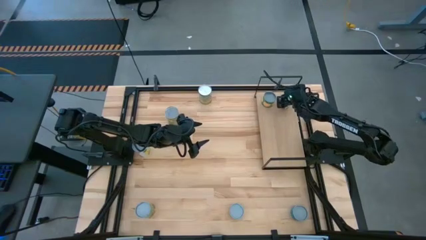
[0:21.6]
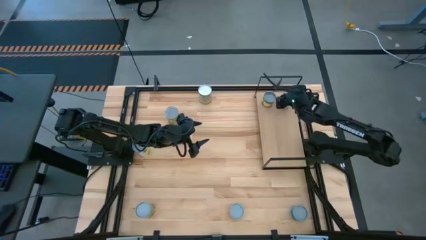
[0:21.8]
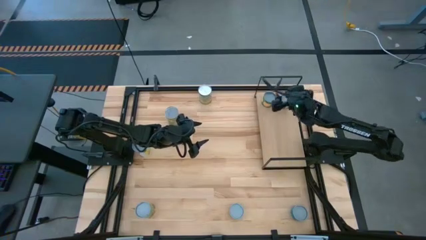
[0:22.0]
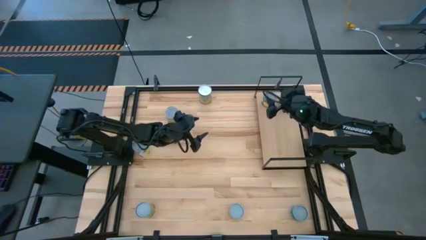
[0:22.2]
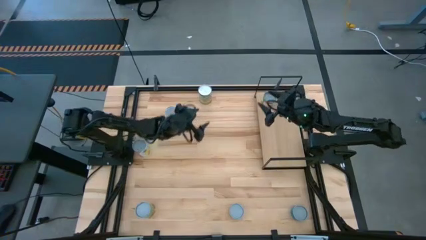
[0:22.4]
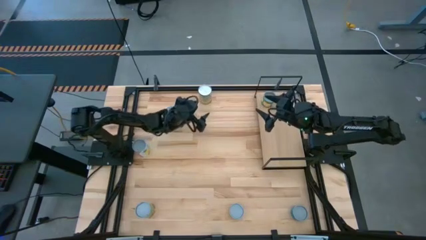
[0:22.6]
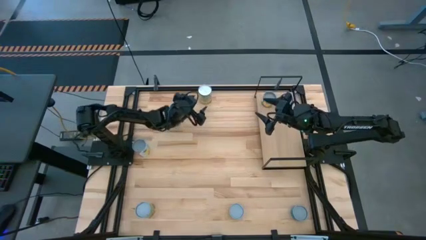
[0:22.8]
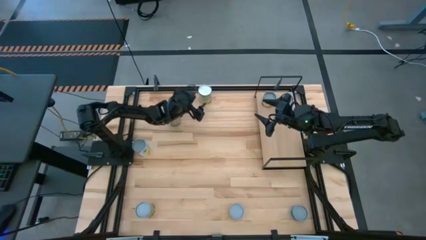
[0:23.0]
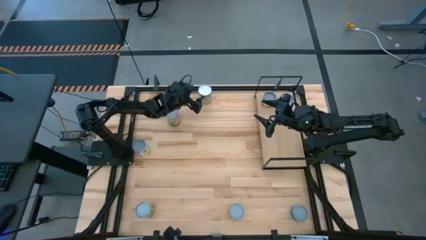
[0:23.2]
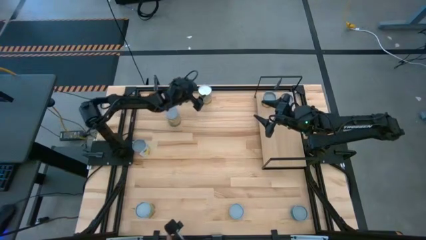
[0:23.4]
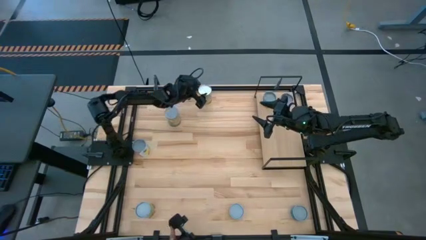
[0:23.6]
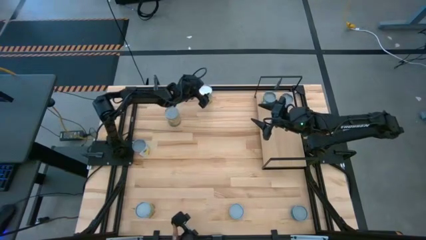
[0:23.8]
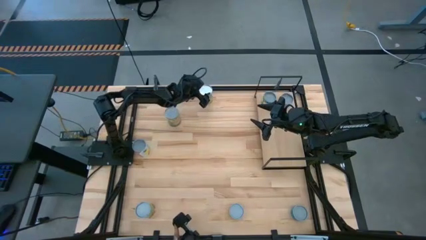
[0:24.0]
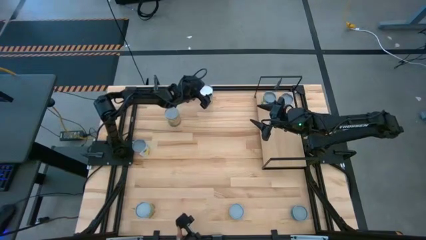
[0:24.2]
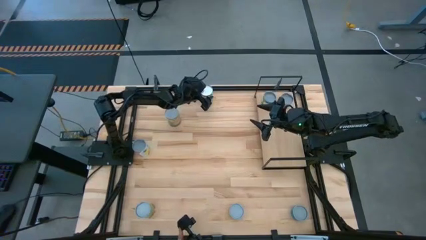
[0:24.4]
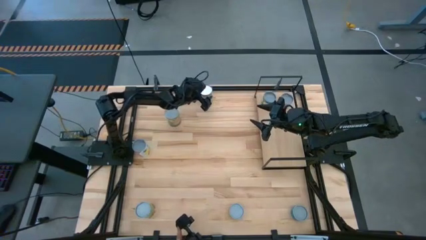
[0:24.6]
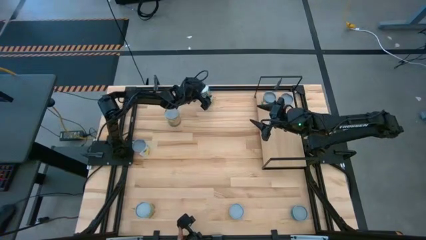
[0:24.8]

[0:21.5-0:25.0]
Task: Pick and place cans onto a shelf
Put the canned carrots on the shelf

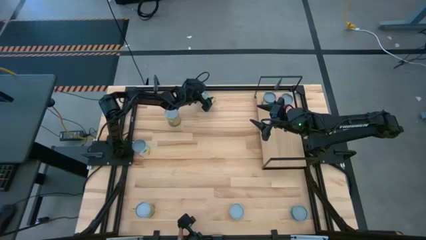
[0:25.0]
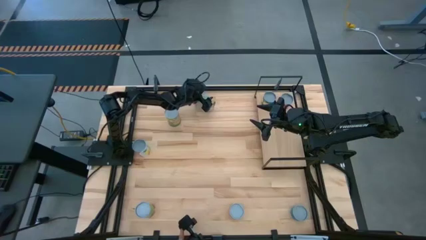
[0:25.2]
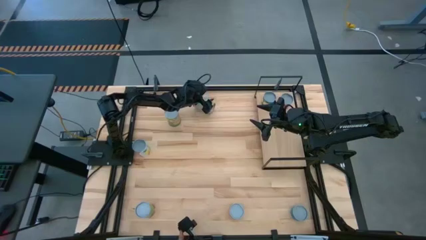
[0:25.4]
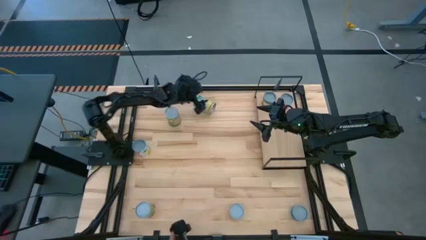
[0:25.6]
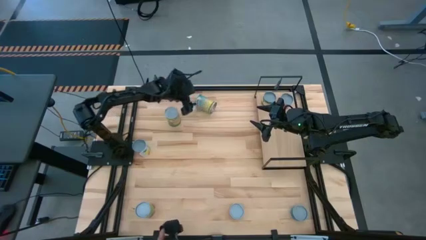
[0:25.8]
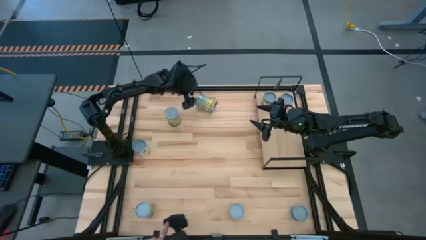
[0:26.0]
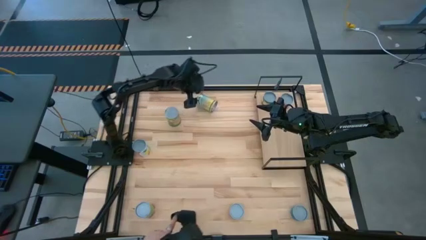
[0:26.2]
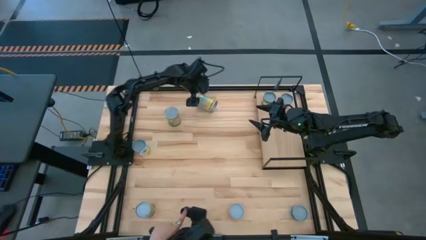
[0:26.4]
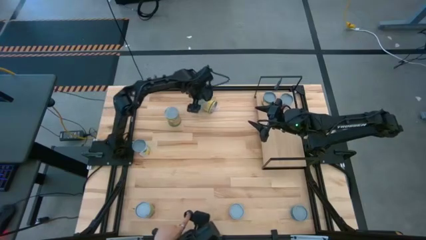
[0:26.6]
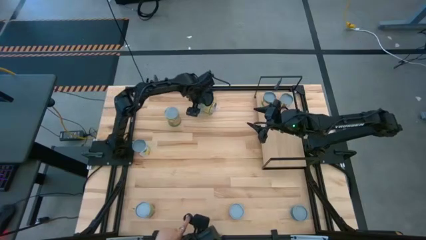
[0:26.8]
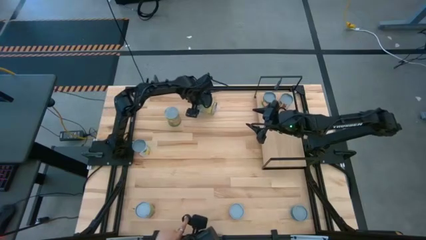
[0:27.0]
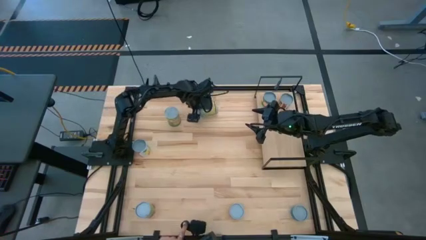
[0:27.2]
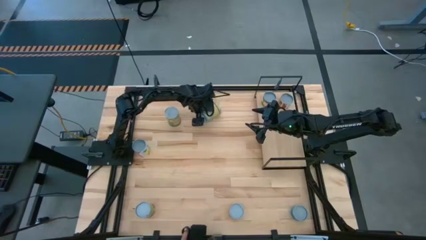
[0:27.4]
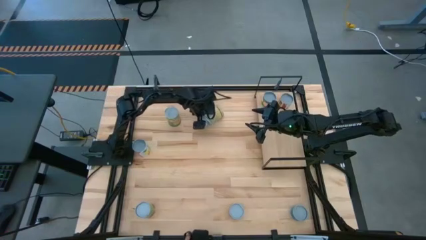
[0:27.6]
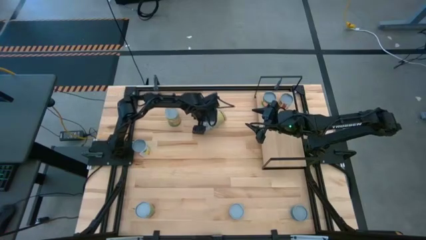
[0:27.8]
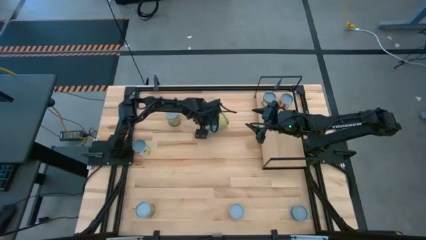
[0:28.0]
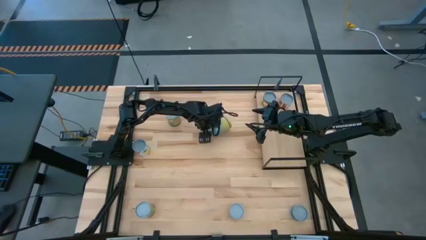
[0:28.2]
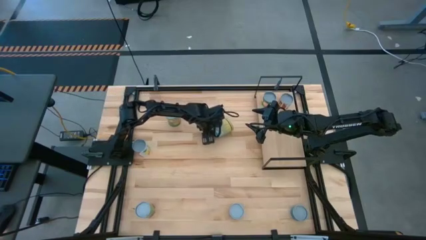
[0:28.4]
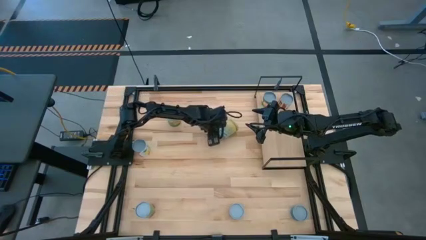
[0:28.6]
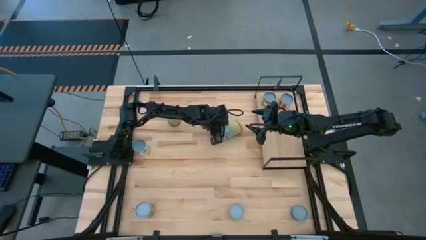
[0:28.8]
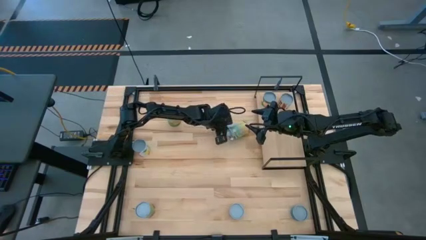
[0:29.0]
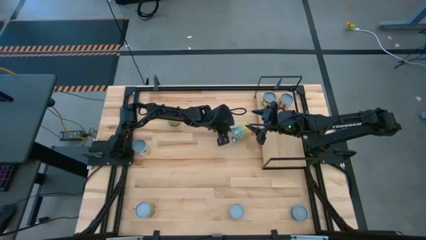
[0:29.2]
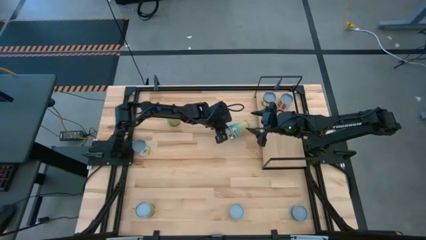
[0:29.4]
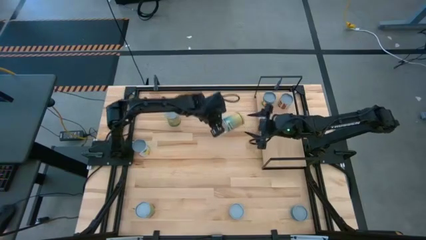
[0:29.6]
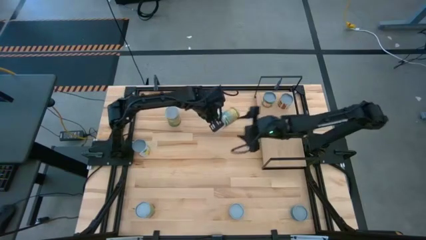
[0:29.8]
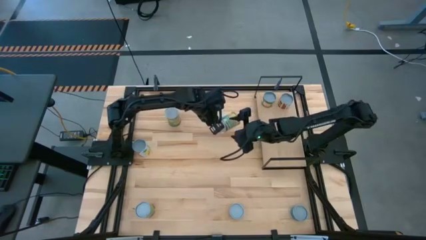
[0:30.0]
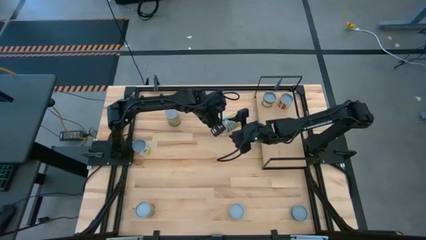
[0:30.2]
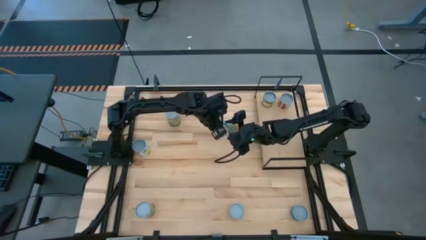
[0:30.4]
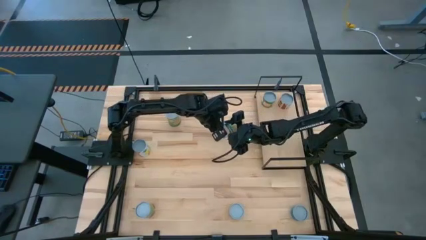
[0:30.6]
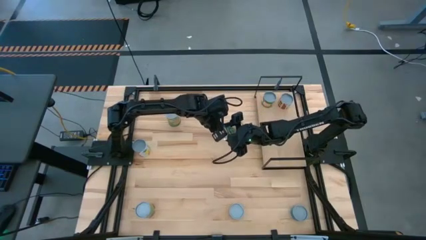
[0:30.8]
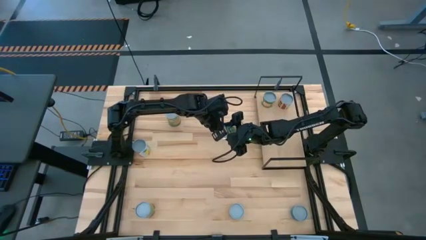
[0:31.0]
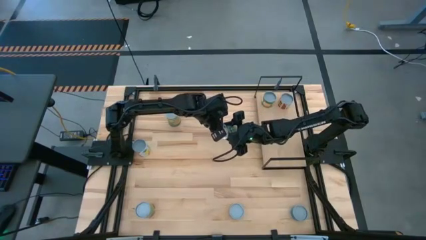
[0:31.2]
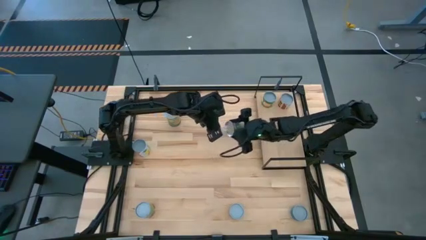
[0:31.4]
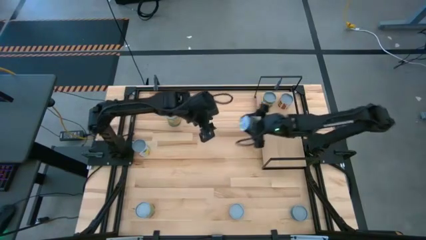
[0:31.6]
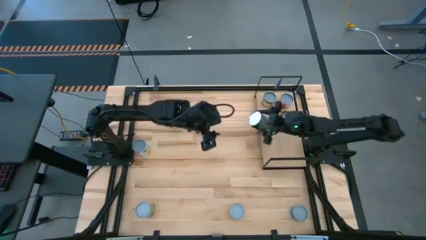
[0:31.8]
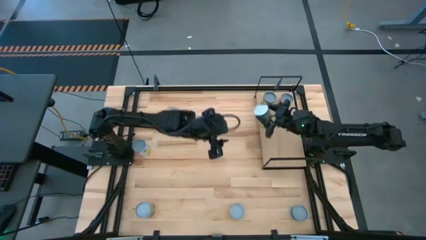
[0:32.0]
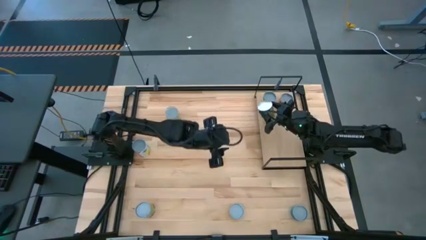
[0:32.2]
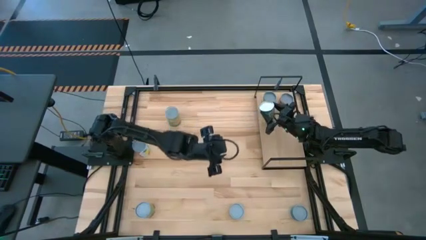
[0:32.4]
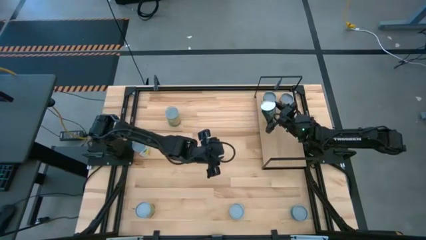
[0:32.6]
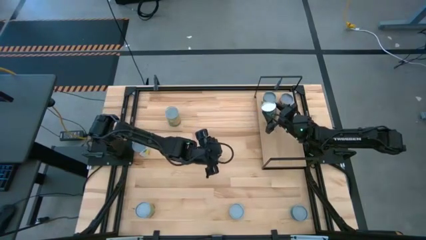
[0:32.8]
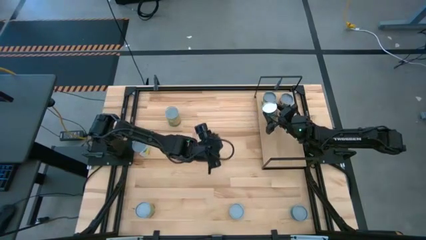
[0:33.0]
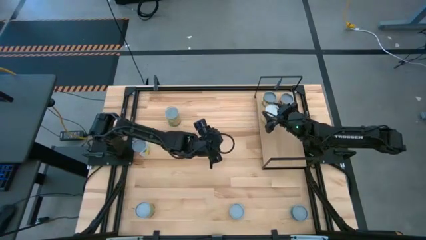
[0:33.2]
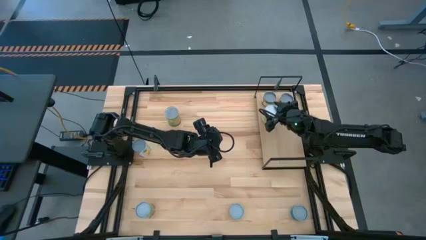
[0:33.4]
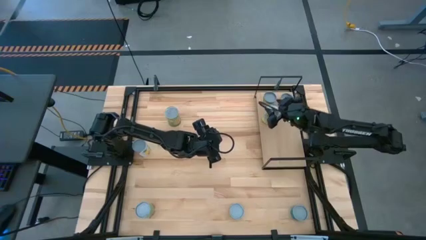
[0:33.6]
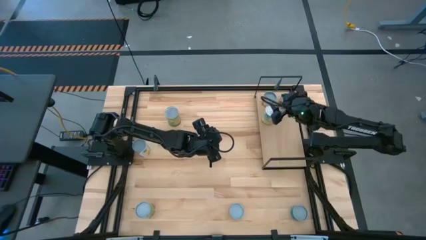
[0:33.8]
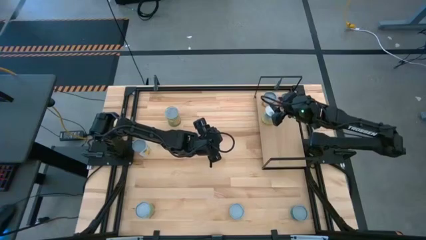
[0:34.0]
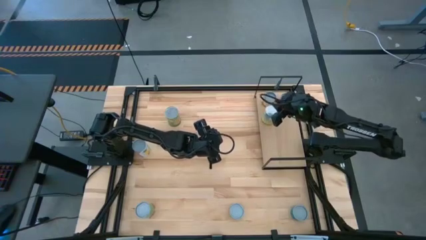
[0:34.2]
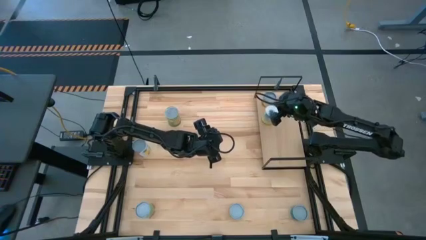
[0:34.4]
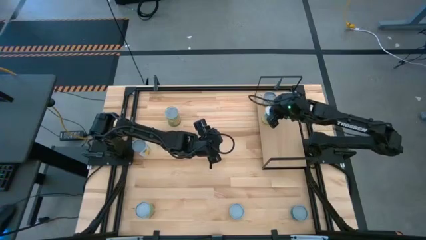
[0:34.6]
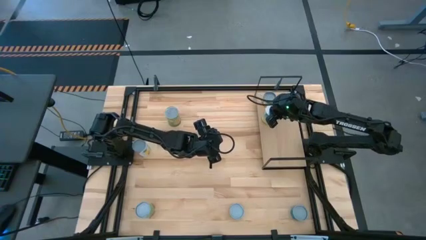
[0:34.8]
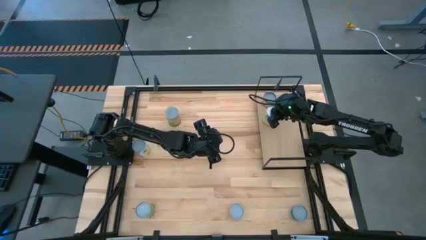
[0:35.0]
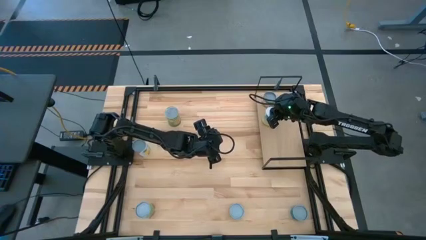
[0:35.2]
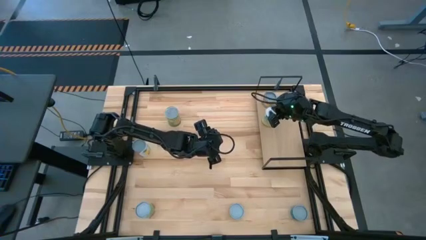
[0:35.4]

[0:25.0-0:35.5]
Put the canned carrots on the shelf

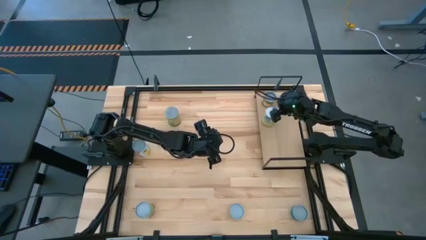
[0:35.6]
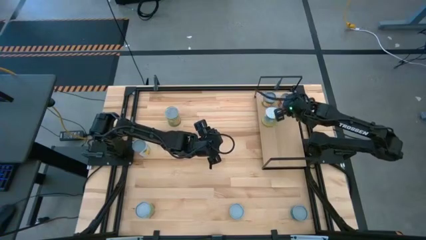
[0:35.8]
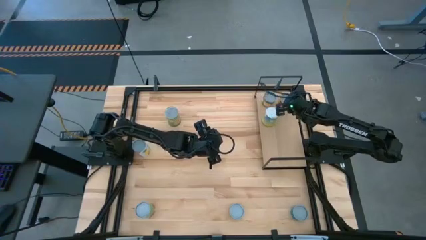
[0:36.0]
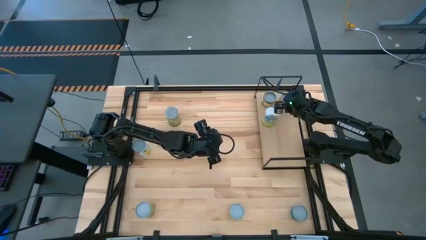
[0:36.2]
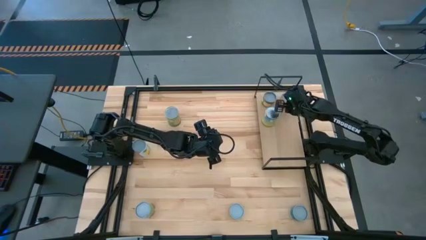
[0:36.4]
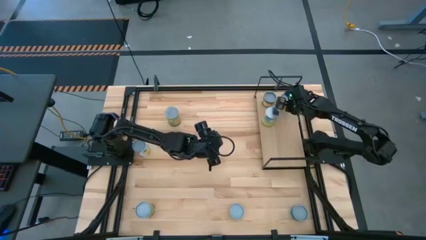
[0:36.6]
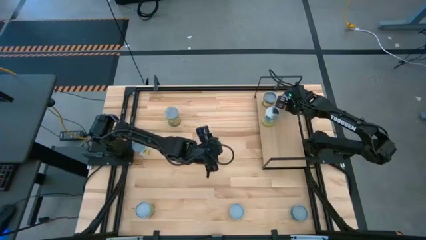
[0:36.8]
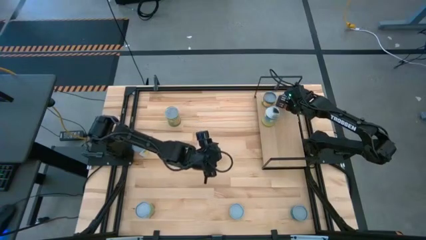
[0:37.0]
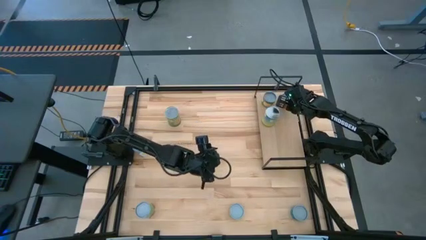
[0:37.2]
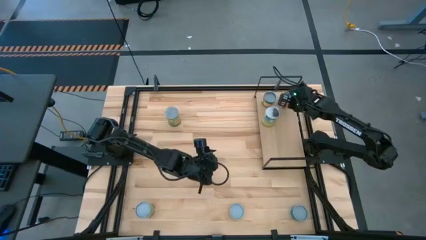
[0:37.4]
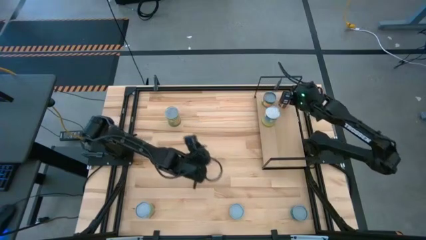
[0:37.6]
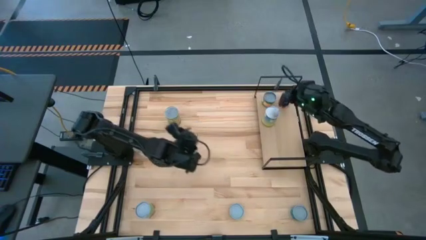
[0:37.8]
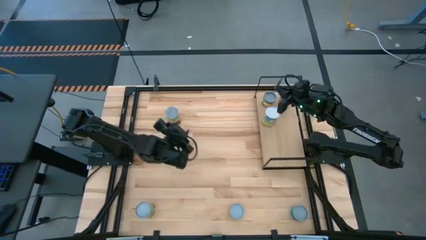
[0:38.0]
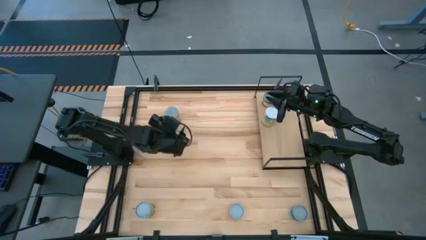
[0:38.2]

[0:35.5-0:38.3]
Adjust the canned diced tomatoes on the shelf
